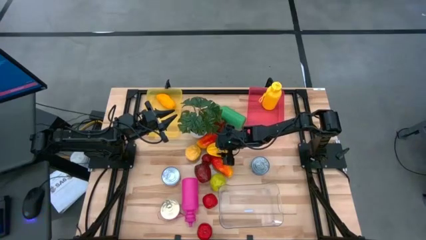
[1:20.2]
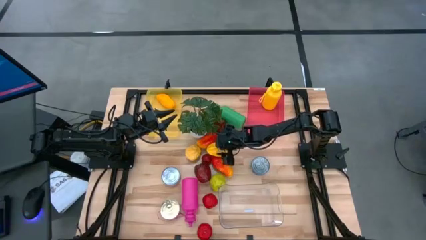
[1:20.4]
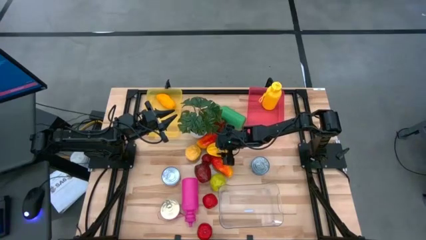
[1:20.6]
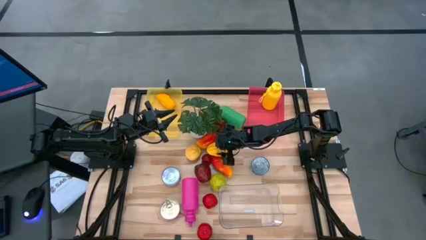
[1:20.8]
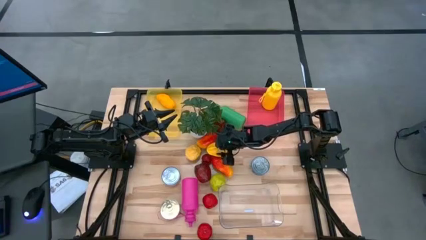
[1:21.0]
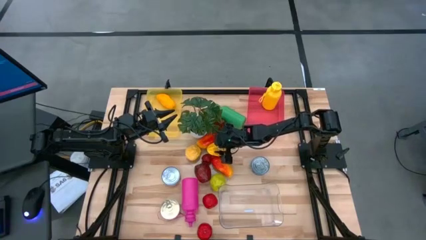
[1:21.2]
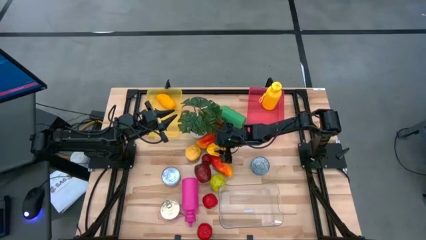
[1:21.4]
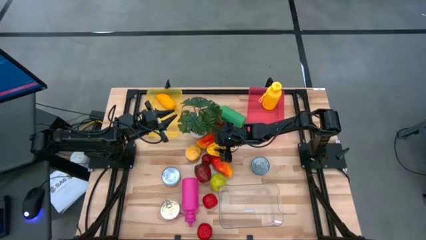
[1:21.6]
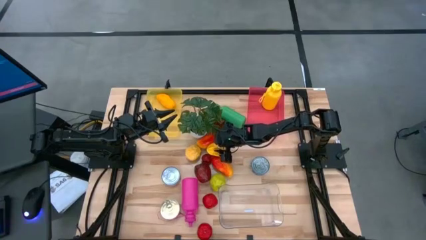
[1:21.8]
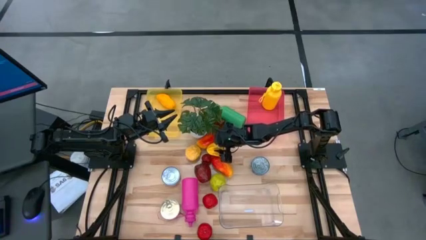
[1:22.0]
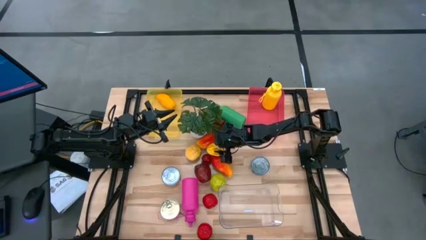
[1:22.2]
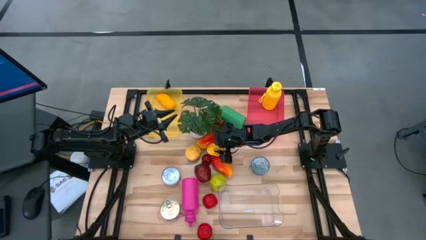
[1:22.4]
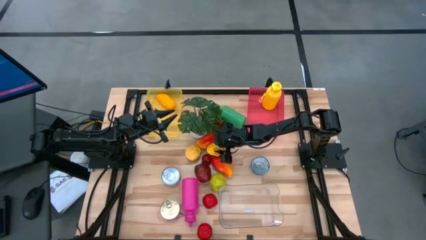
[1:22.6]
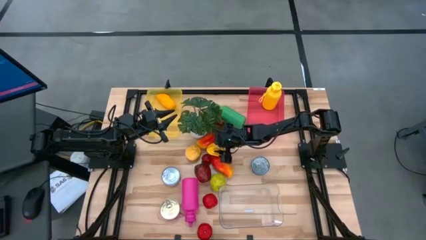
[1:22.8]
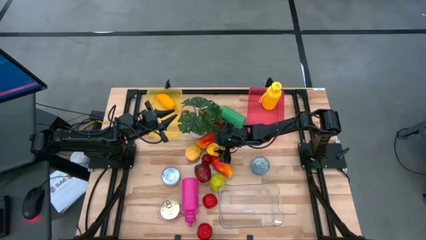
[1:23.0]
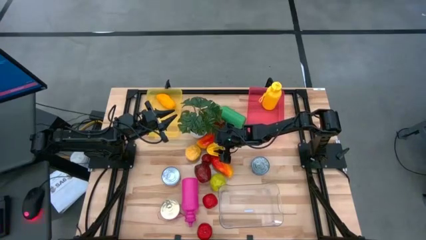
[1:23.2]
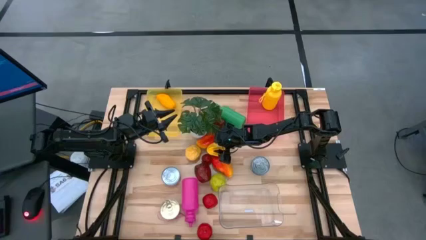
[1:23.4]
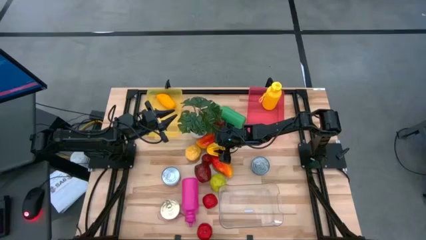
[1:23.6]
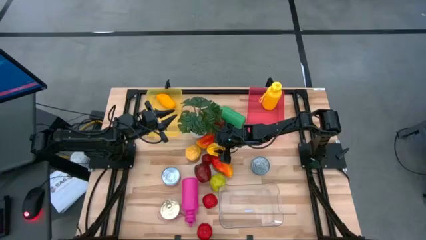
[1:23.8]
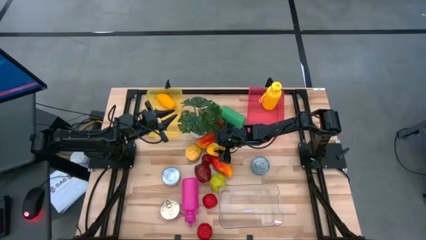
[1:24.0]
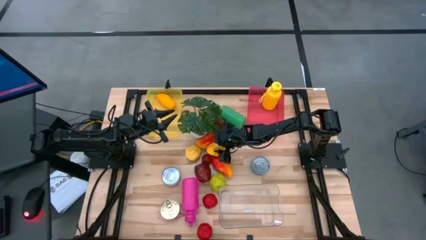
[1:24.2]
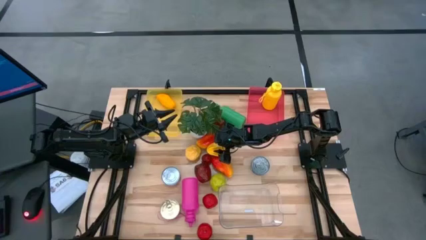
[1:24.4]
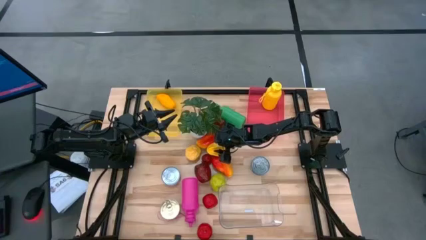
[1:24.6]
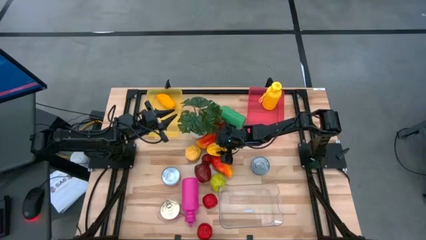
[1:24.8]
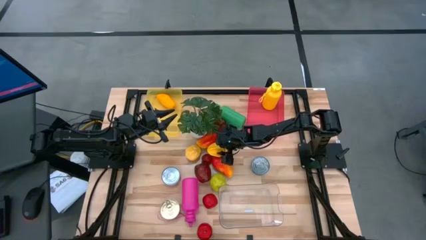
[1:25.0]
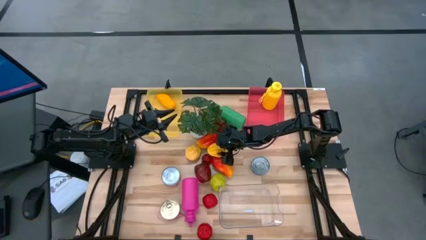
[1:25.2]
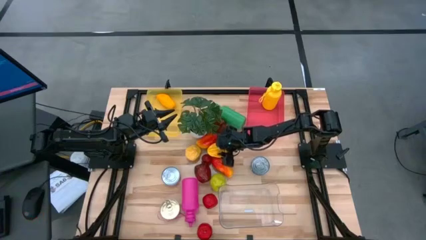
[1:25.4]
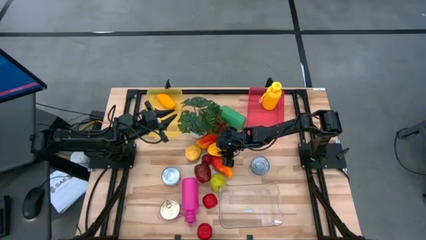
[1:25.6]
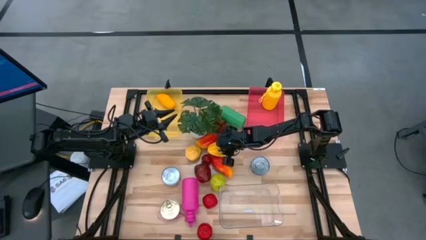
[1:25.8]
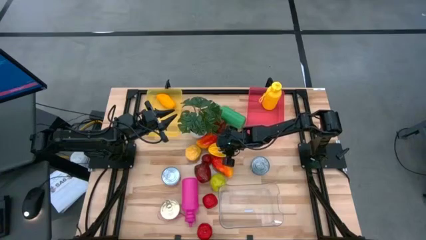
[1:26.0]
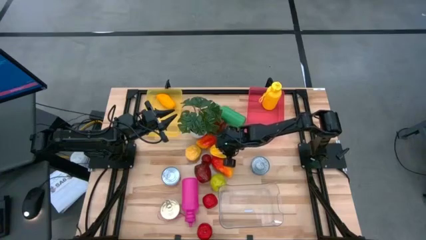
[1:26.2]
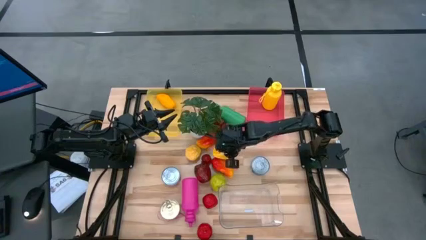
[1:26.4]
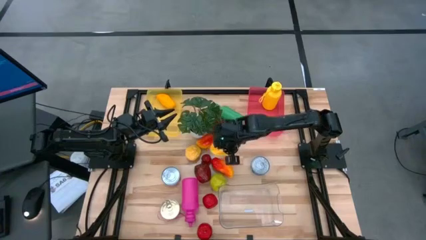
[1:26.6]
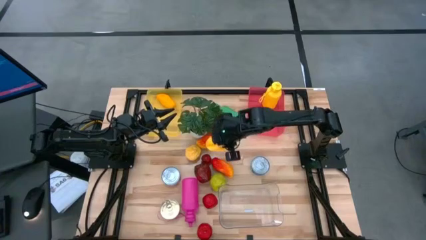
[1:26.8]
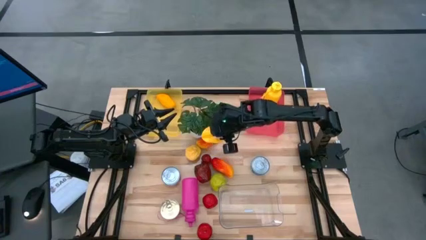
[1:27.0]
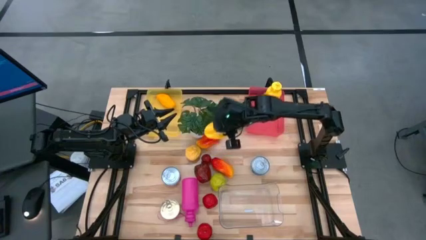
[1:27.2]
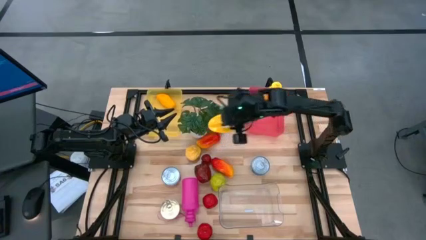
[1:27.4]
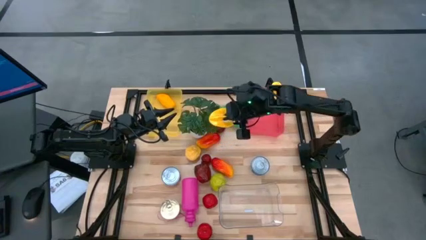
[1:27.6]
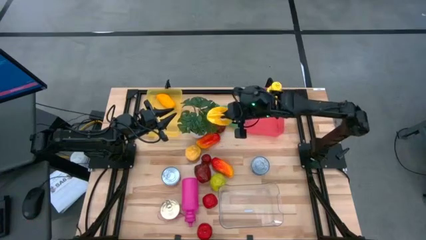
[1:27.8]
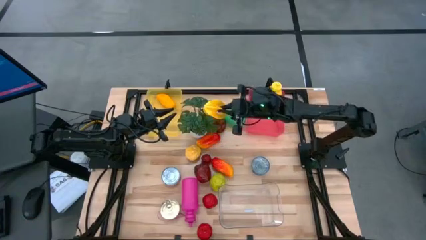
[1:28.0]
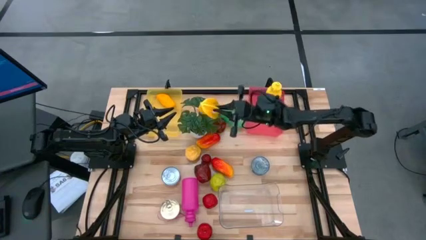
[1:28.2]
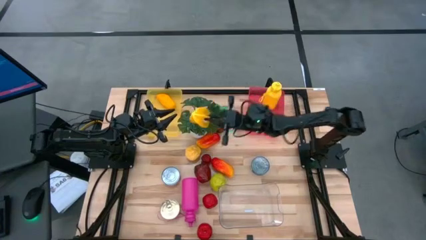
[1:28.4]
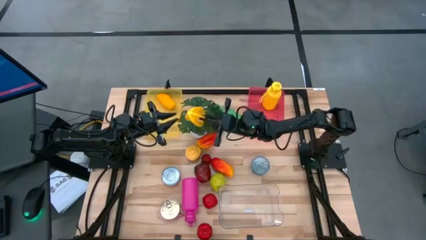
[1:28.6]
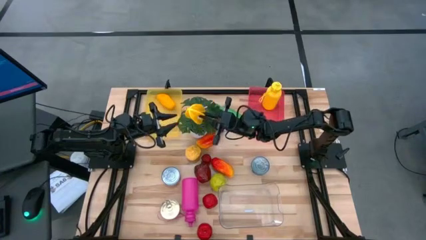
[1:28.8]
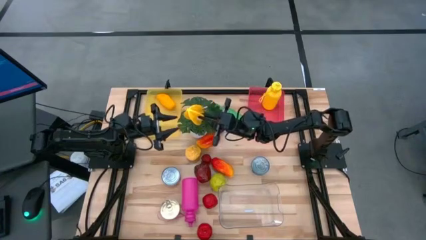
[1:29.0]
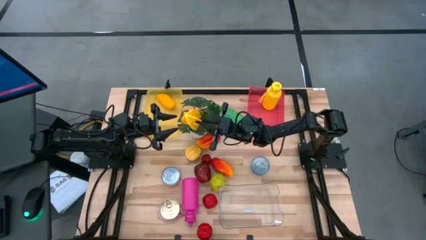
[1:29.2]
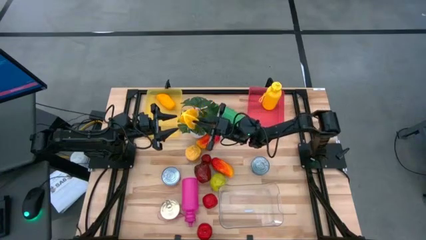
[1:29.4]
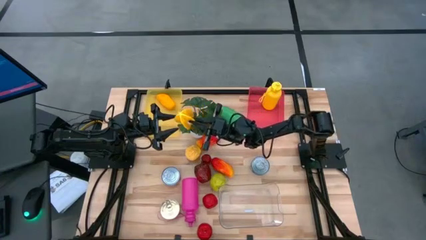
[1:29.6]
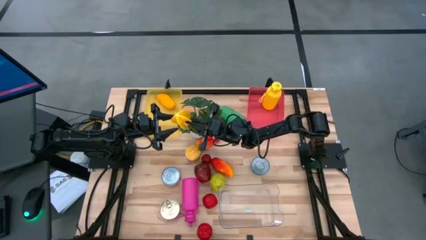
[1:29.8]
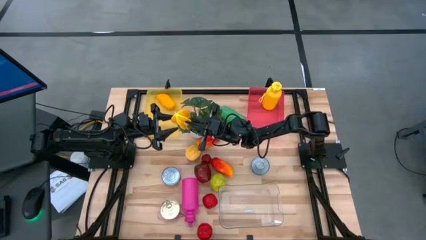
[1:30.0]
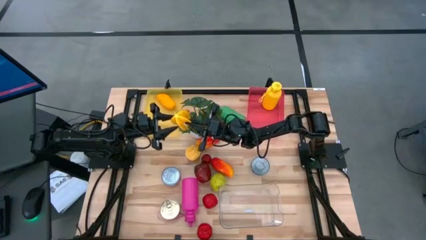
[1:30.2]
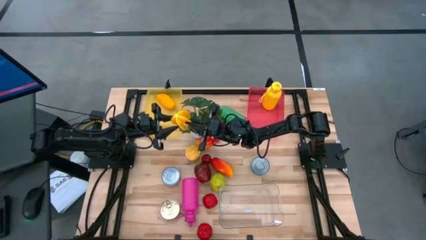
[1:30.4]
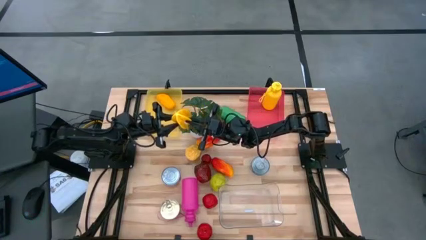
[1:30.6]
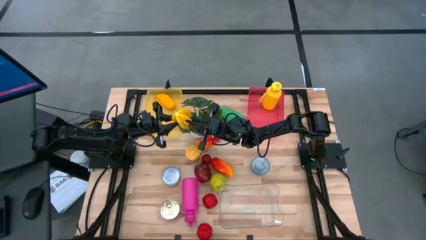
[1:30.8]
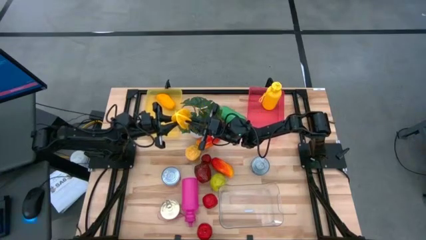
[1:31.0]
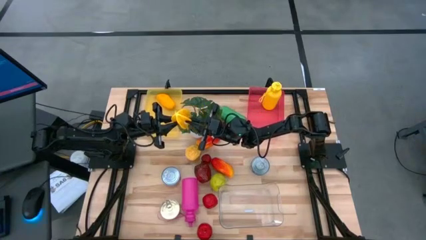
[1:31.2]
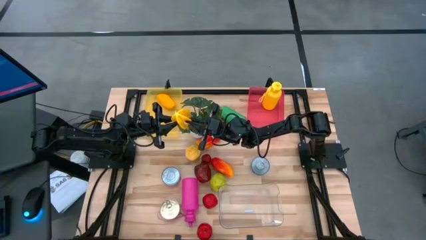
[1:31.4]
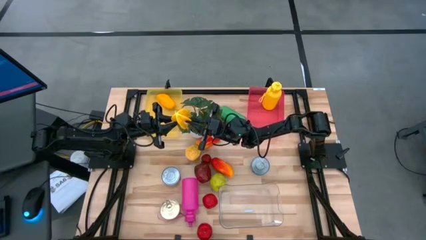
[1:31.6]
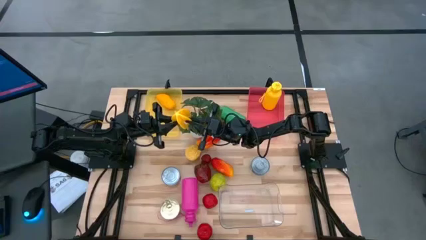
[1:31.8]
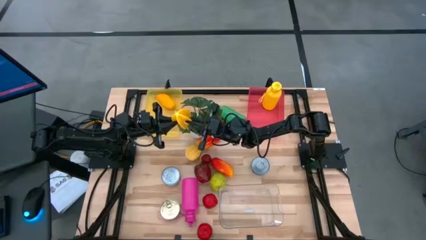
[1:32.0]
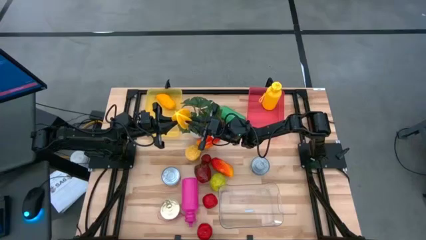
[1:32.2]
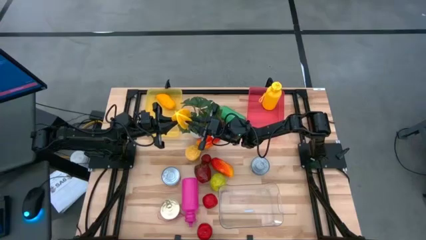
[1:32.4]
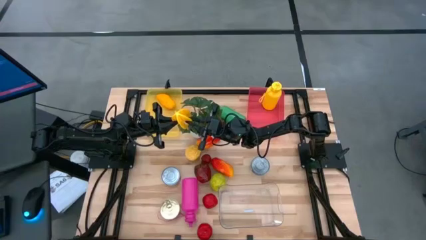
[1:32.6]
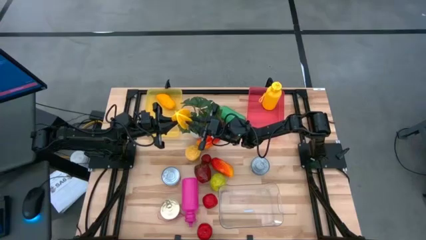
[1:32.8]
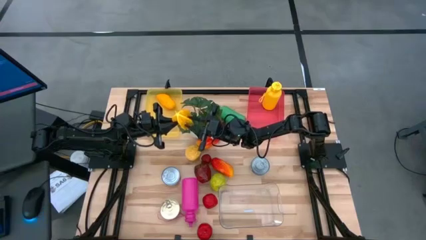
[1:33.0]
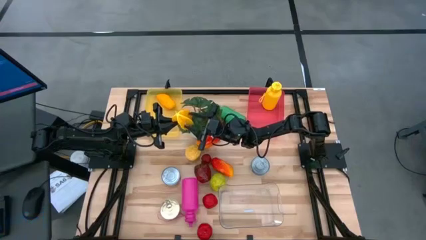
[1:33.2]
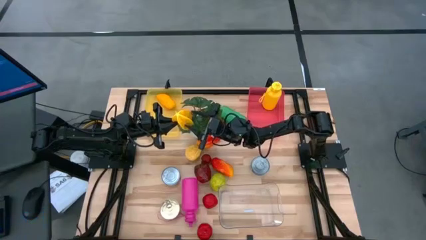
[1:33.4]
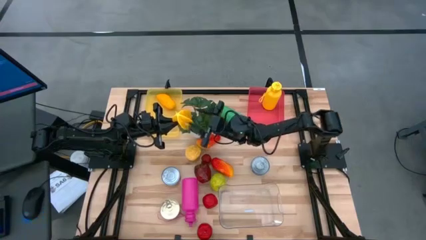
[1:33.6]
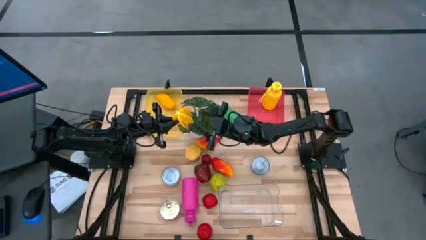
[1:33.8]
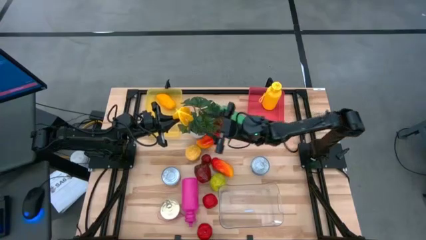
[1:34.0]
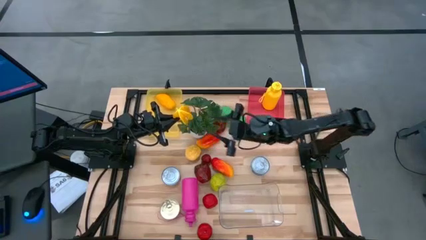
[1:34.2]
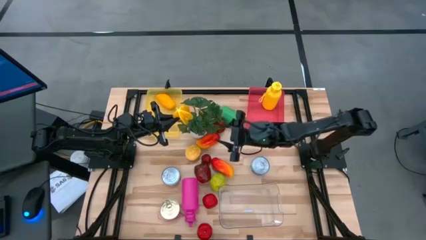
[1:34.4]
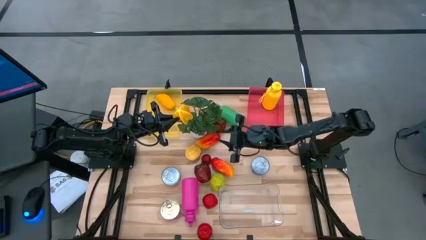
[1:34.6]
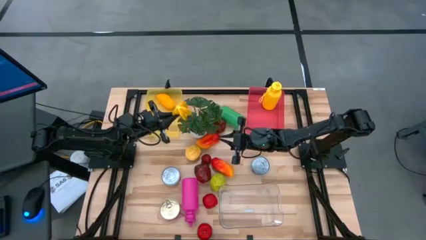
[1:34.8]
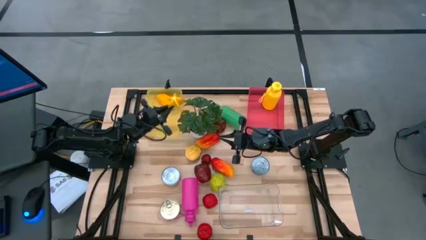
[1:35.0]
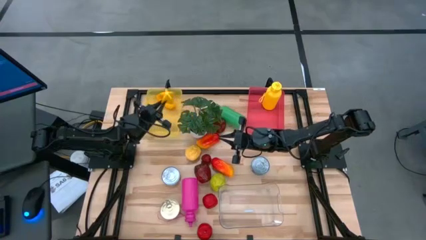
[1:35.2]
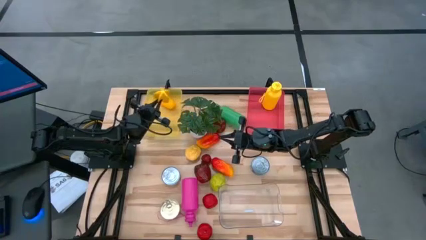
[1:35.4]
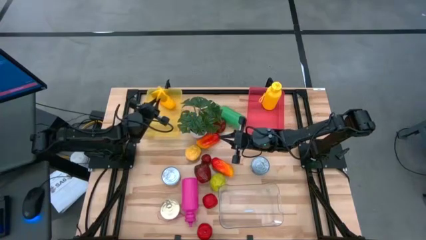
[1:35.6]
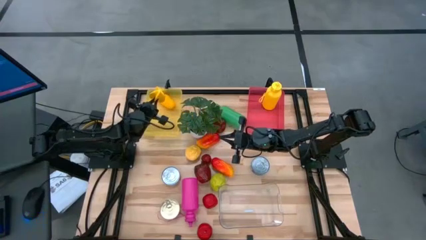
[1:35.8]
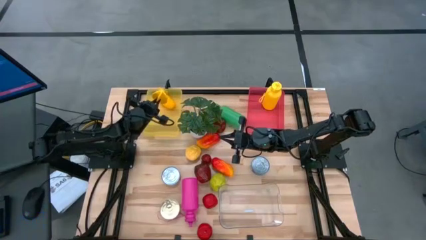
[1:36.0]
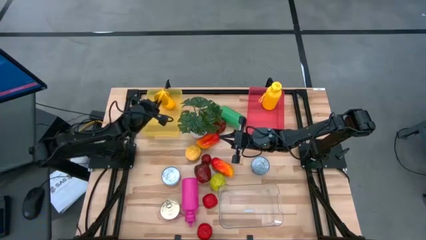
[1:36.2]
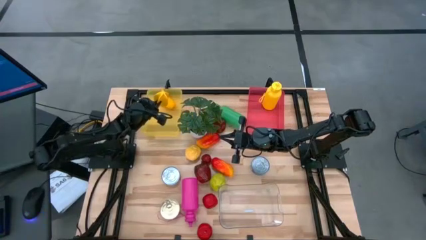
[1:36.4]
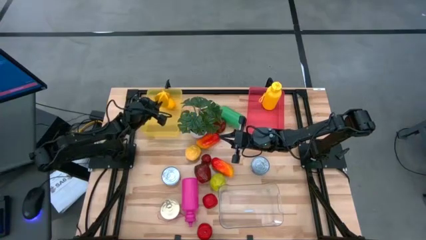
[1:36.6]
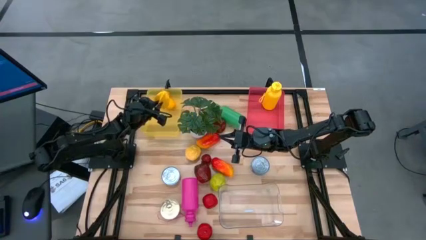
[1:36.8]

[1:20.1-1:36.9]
Task: Pick & Place Food Item
Put the yellow starfruit into the yellow bin
